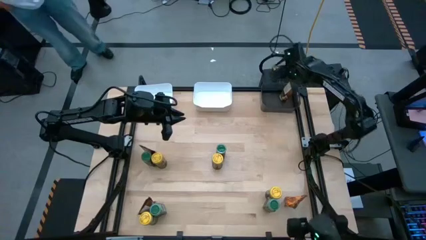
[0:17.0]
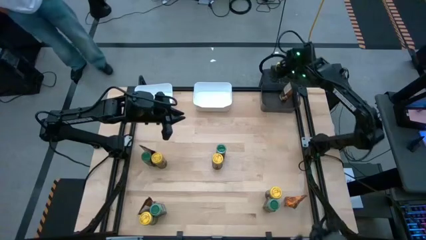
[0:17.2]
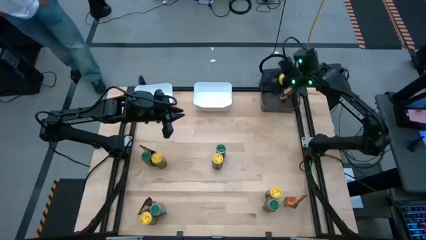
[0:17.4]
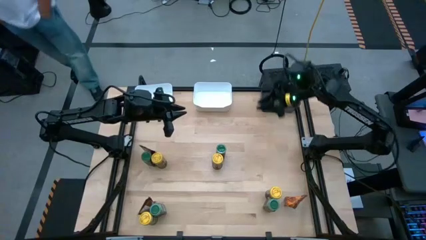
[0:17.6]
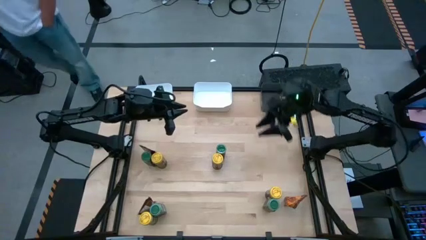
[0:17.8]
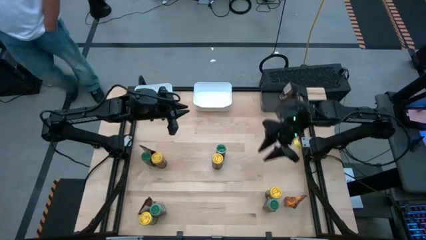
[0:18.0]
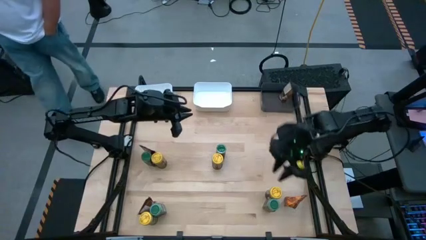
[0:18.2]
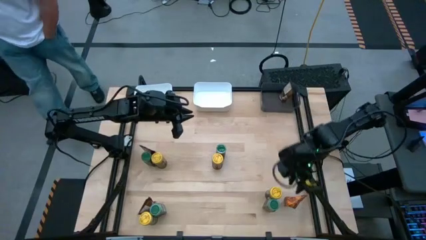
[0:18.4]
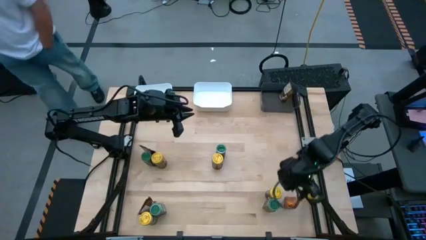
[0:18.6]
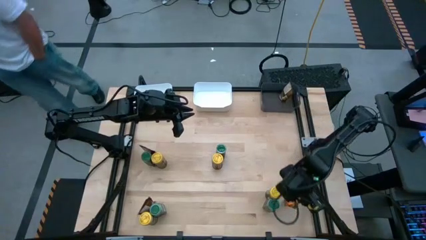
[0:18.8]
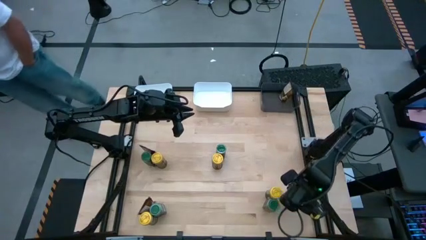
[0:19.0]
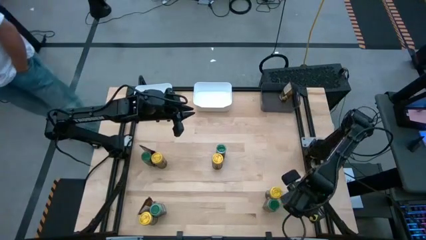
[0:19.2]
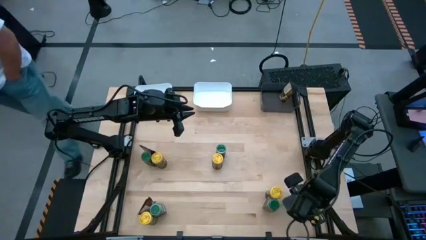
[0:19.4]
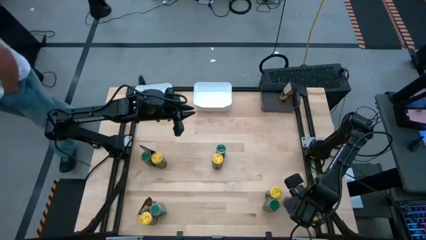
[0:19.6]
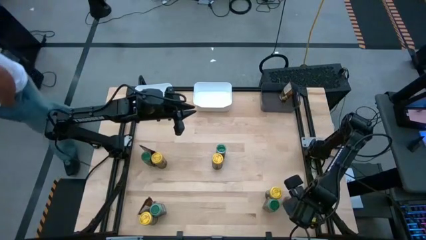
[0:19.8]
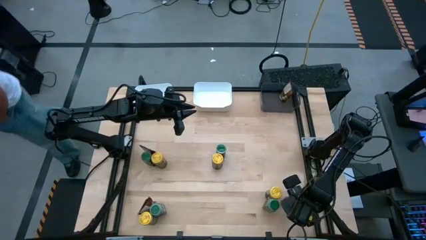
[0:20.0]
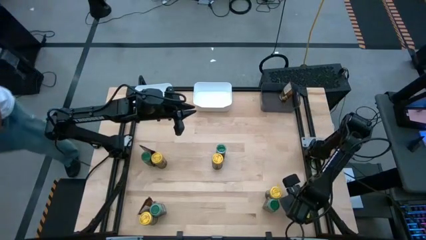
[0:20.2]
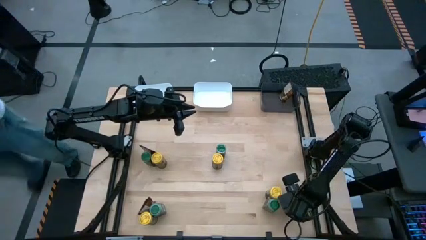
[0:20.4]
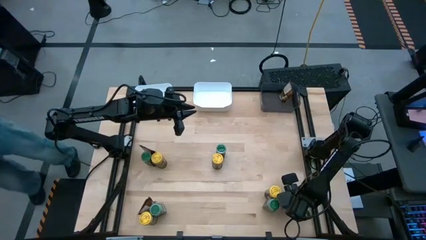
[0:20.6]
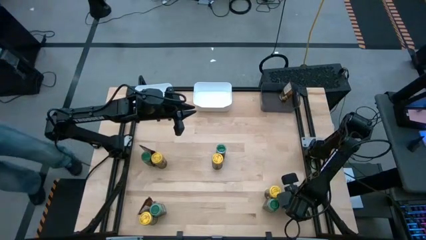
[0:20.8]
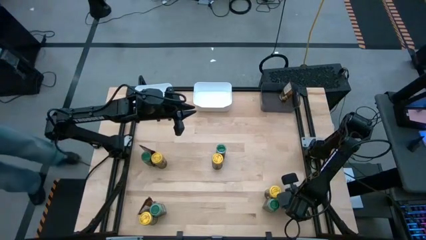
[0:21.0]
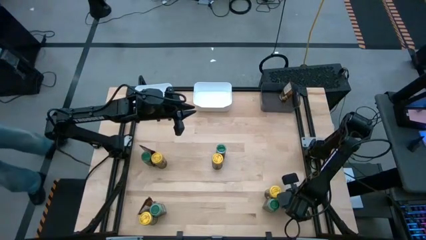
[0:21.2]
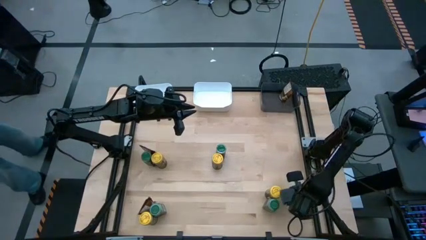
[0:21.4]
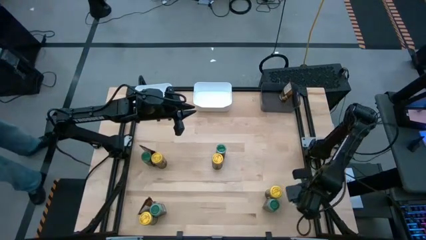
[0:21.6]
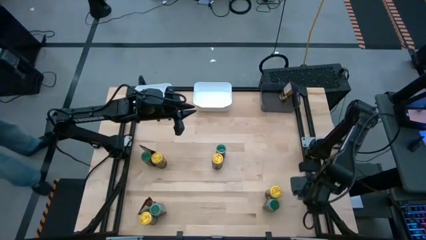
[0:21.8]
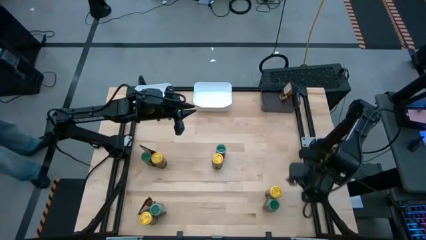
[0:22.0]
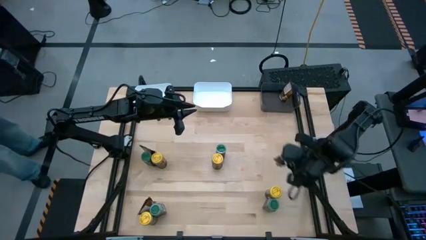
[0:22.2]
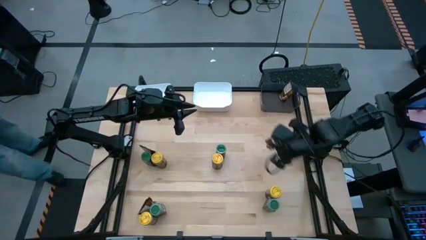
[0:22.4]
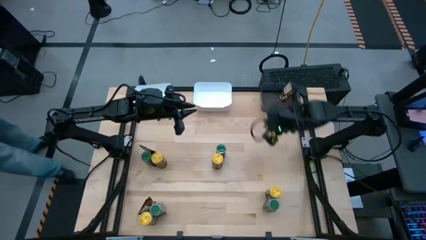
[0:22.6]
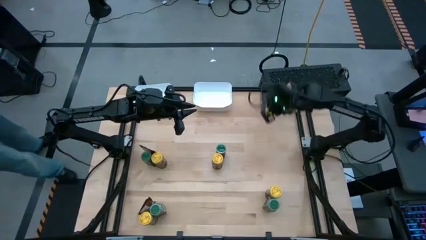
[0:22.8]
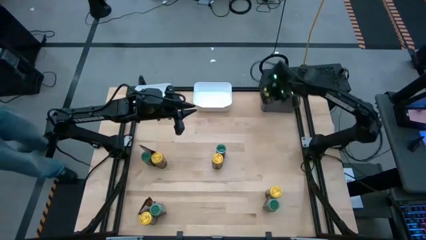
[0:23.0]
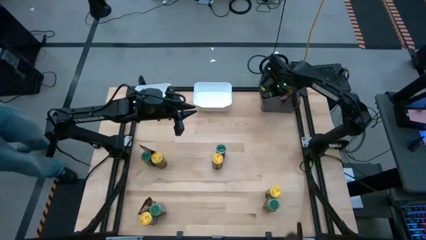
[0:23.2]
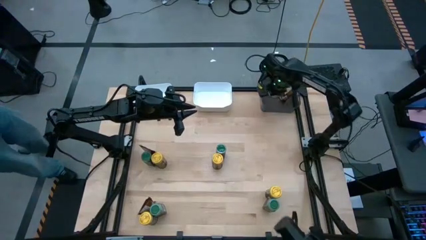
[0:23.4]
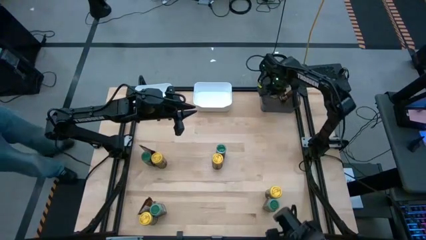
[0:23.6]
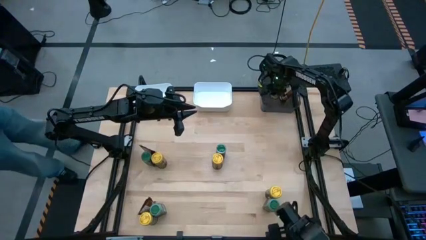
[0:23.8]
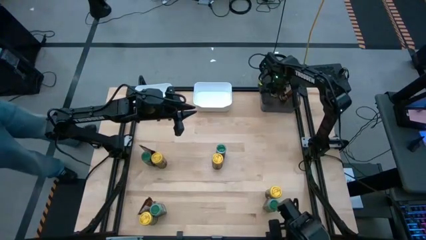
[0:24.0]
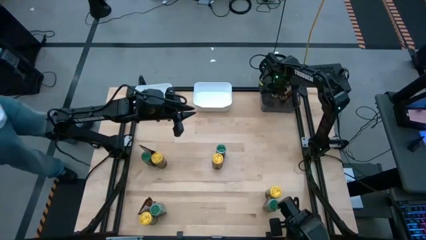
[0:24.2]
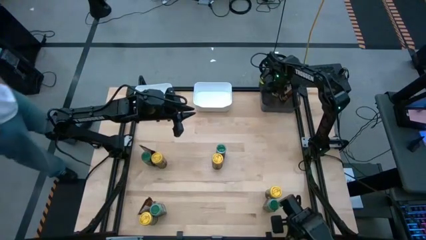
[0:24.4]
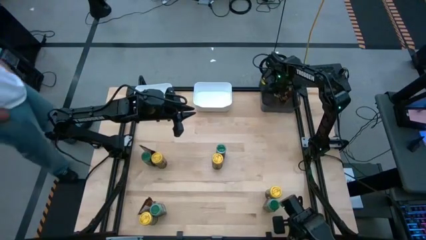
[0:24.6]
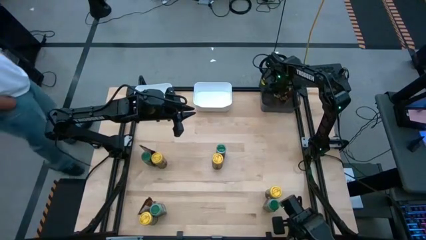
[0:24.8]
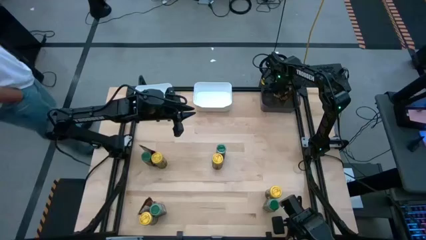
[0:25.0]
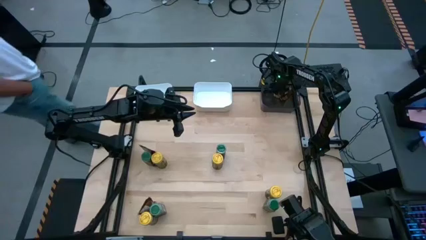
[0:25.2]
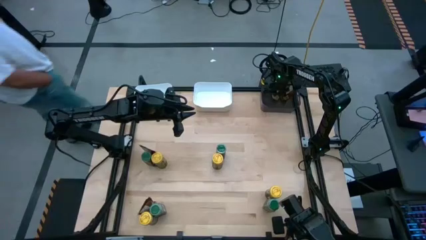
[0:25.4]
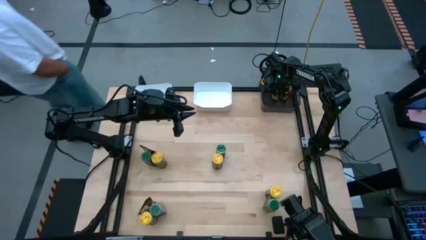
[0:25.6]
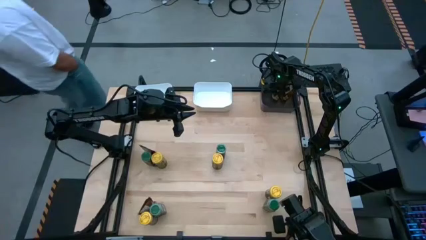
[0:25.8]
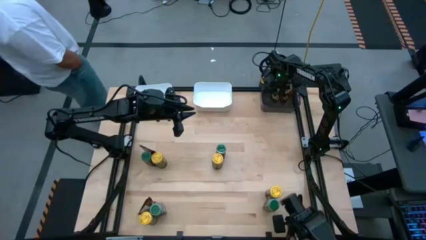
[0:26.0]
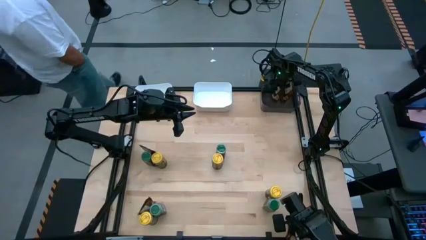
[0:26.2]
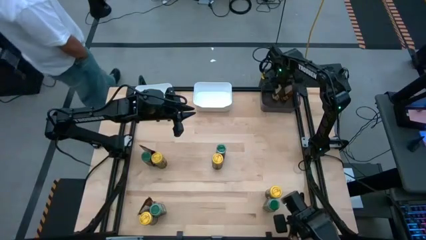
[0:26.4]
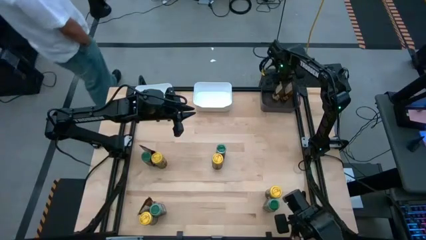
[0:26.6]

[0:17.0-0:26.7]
Task: Sort spices by type
Put the bottom right orange seasoning bag into the black bin

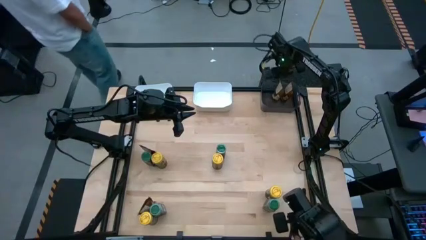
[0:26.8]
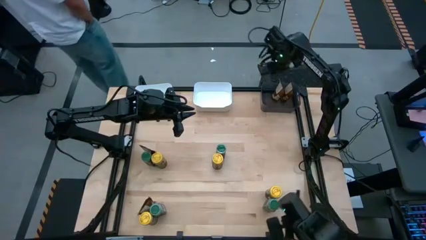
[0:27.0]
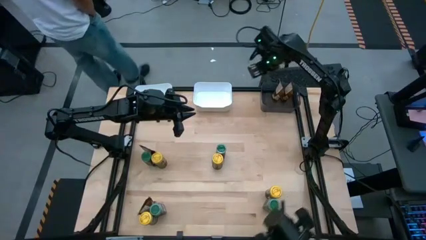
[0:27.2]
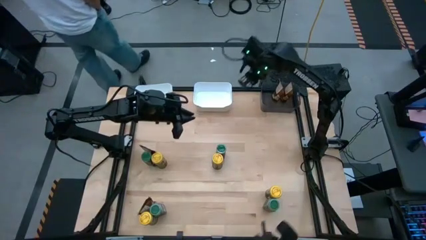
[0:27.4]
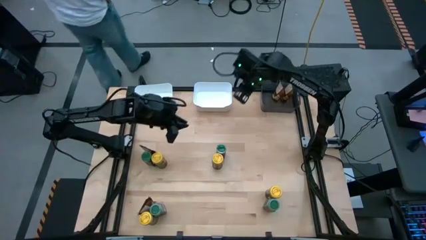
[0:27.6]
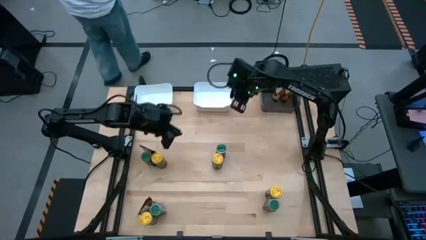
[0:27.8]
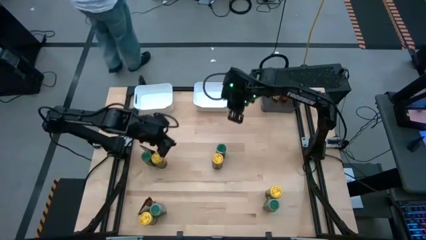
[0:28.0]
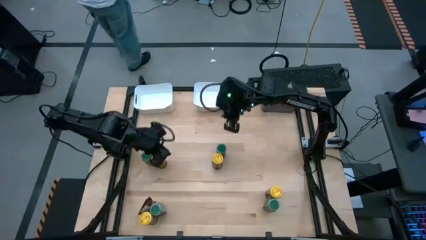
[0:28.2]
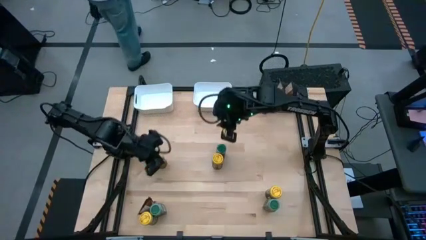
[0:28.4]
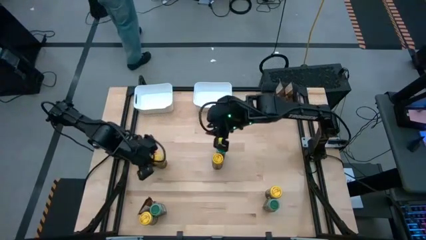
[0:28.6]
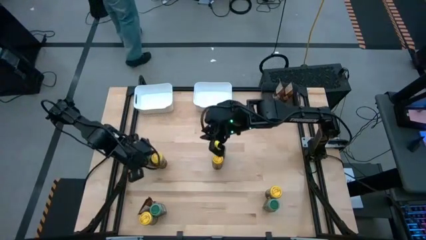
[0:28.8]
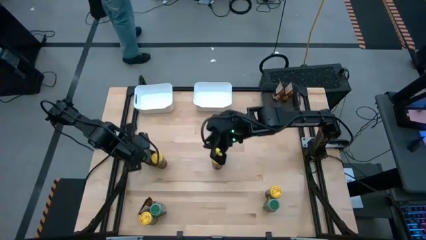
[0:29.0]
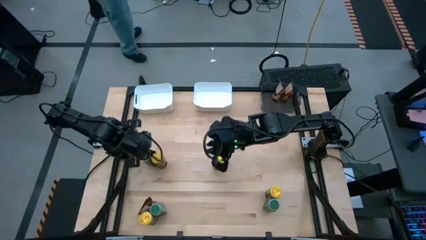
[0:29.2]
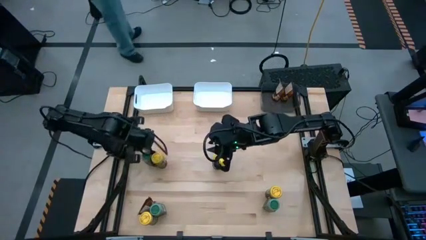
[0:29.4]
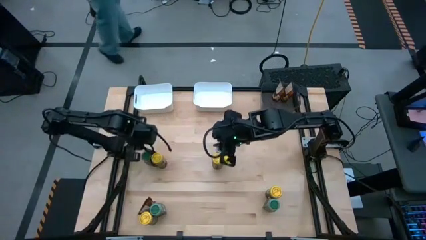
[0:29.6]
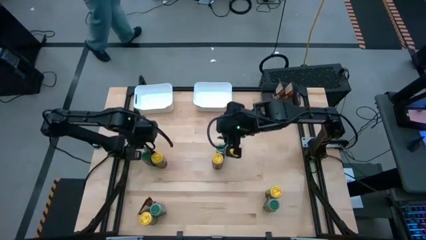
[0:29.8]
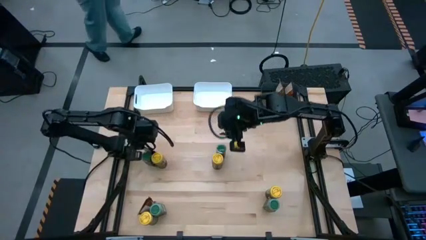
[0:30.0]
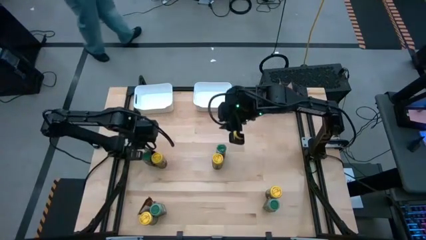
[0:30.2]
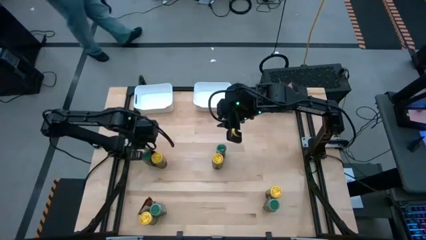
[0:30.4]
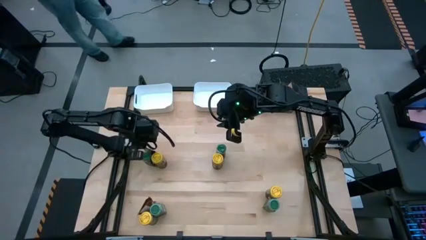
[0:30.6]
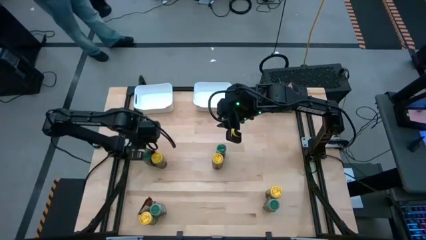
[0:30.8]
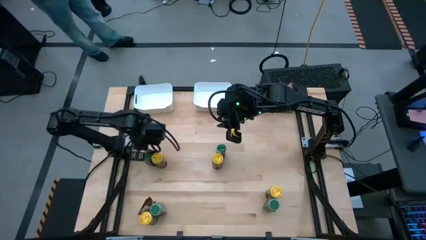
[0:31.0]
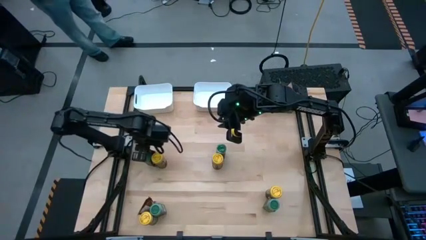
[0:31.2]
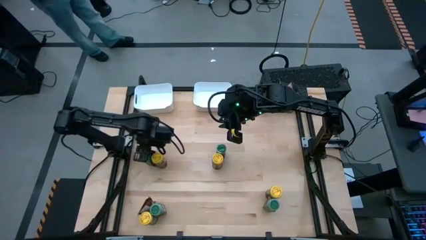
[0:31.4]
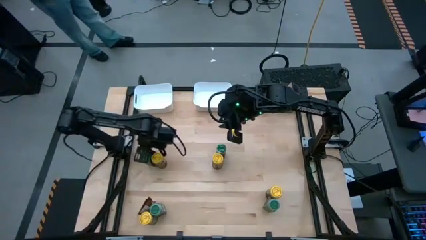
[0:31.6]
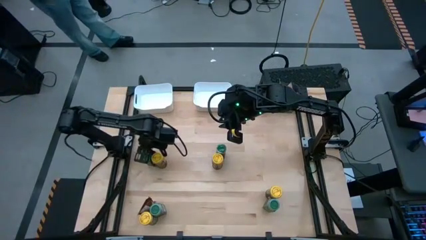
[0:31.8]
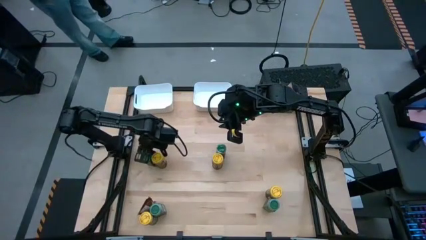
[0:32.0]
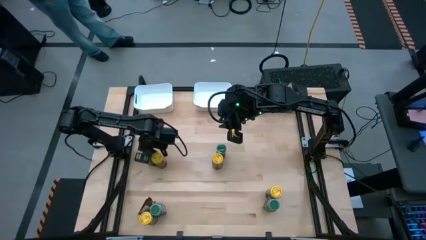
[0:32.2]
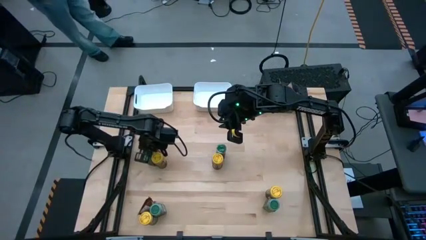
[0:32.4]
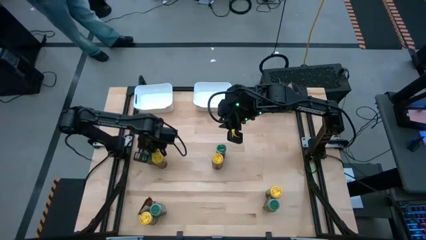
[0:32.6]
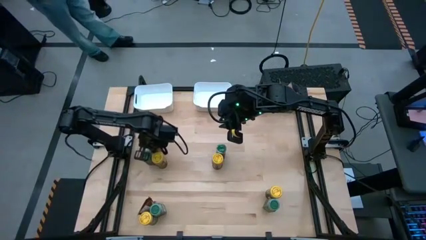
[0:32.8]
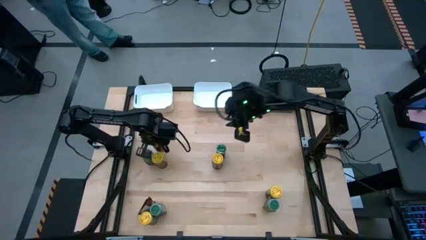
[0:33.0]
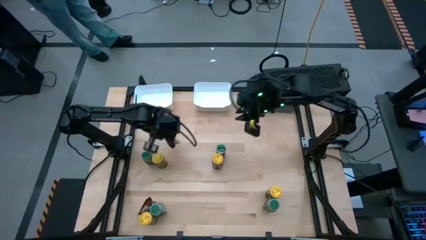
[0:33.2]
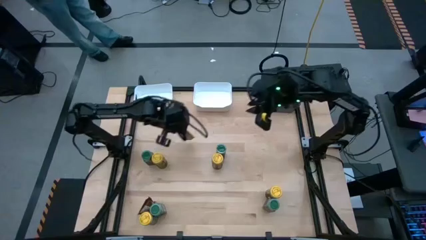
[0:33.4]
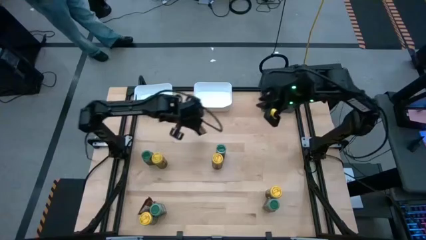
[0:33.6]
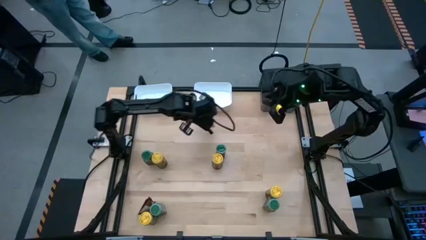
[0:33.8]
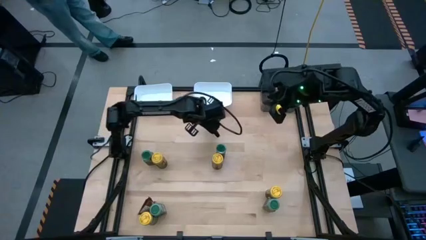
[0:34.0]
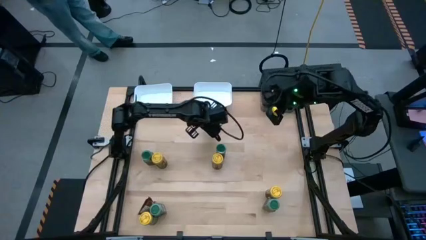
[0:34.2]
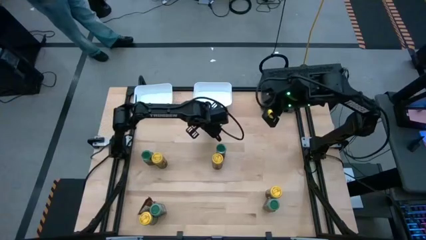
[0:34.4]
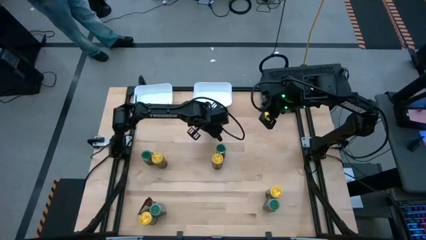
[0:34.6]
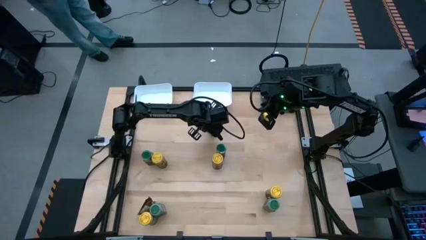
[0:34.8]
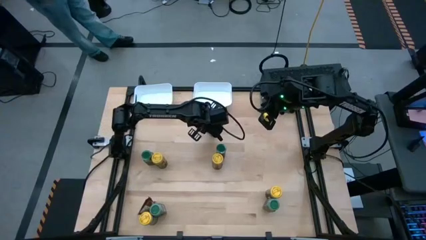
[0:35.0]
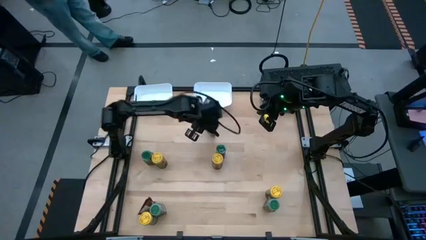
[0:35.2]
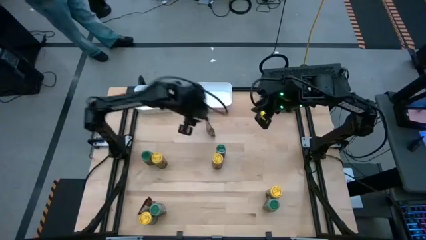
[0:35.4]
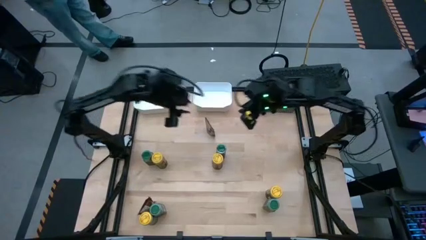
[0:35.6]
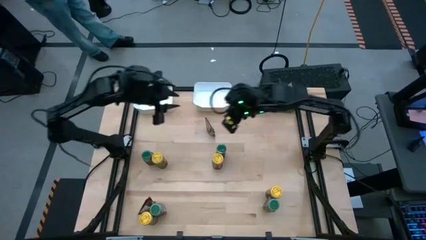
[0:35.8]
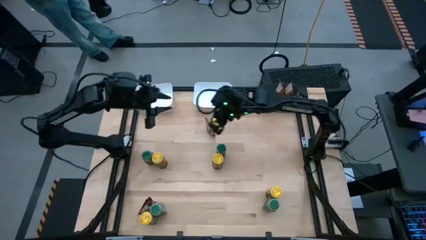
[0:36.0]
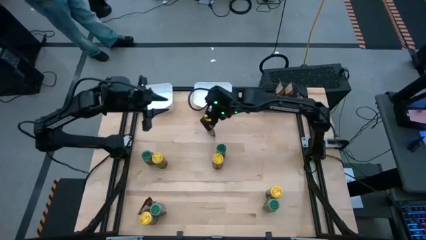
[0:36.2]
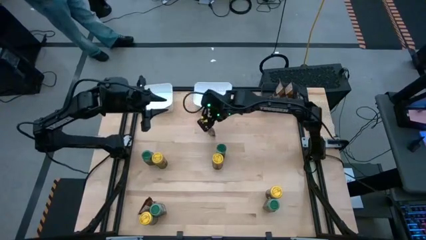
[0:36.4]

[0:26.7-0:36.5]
Put the top orange seasoning bag into the black bin
